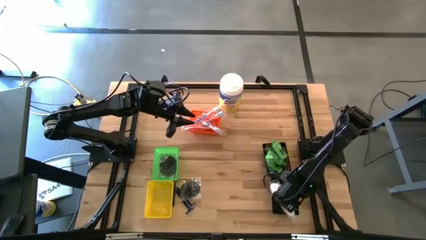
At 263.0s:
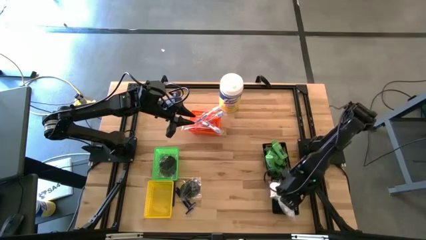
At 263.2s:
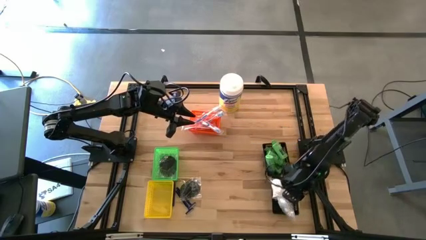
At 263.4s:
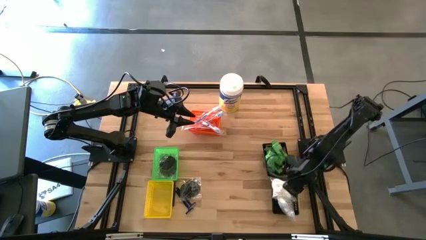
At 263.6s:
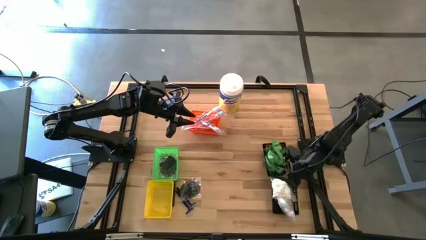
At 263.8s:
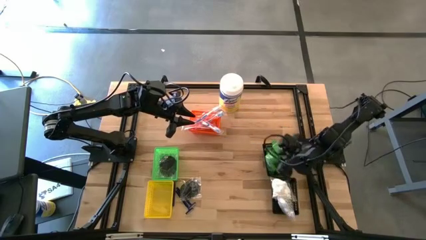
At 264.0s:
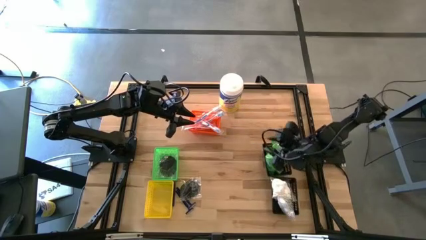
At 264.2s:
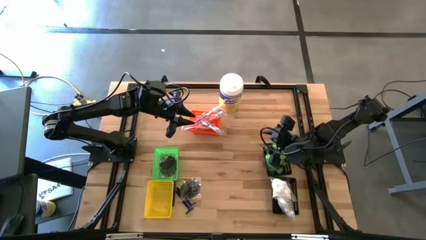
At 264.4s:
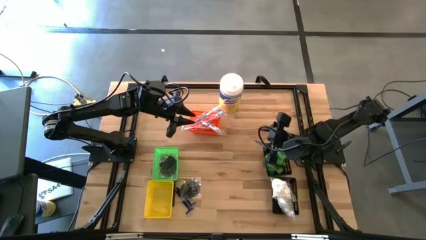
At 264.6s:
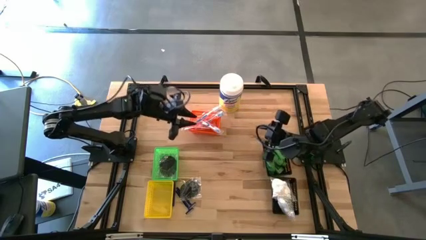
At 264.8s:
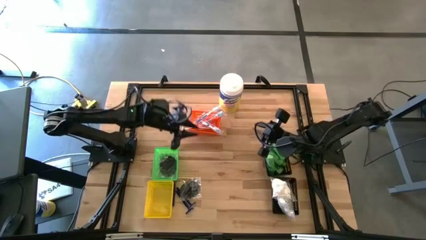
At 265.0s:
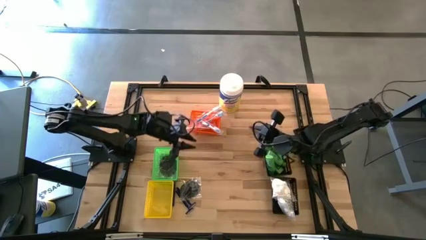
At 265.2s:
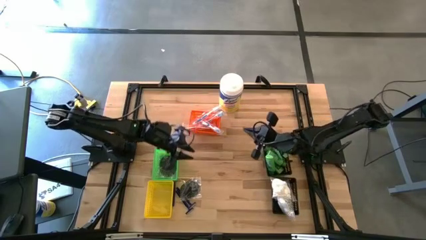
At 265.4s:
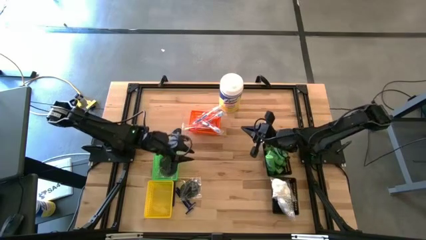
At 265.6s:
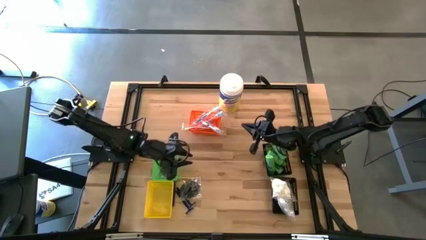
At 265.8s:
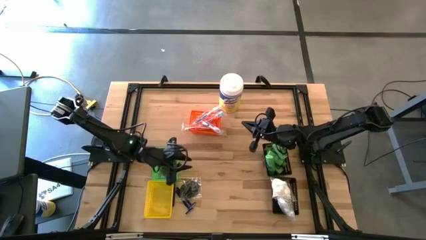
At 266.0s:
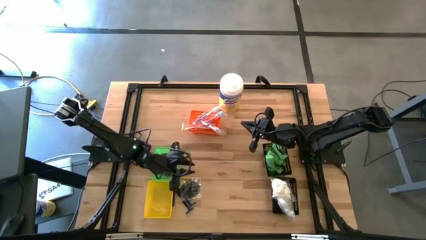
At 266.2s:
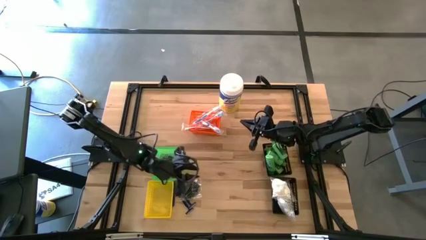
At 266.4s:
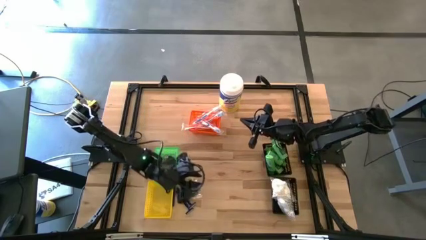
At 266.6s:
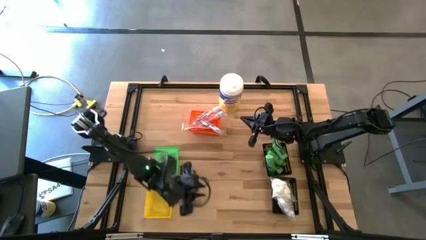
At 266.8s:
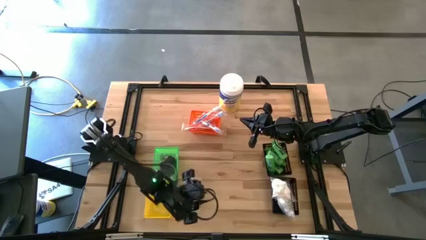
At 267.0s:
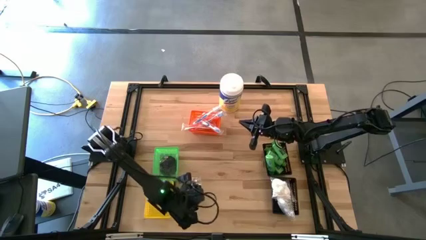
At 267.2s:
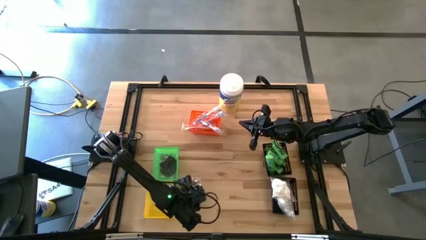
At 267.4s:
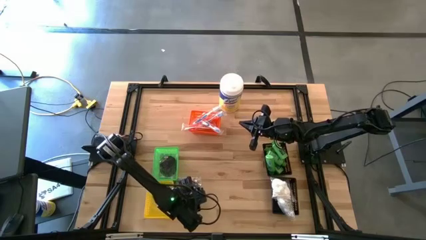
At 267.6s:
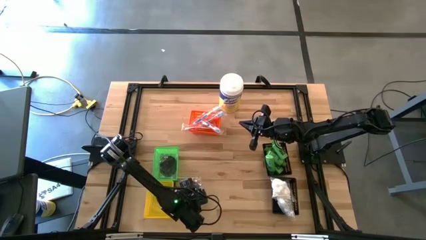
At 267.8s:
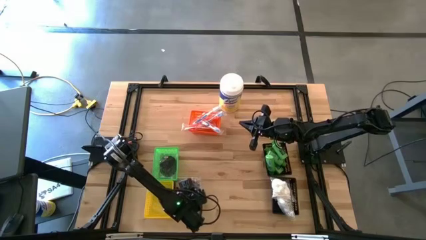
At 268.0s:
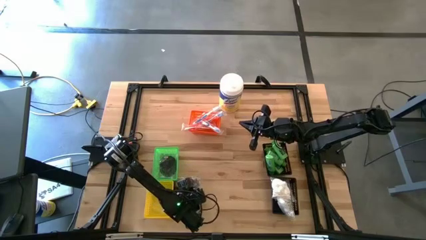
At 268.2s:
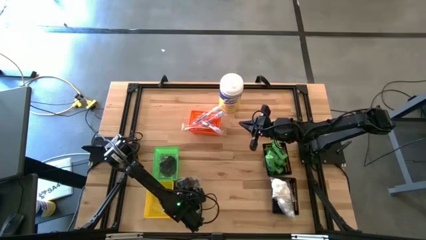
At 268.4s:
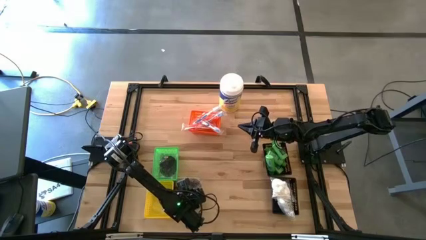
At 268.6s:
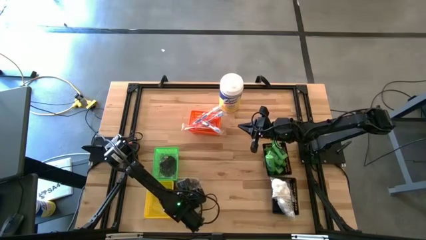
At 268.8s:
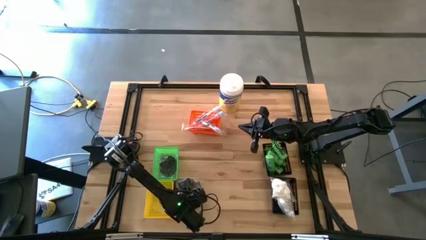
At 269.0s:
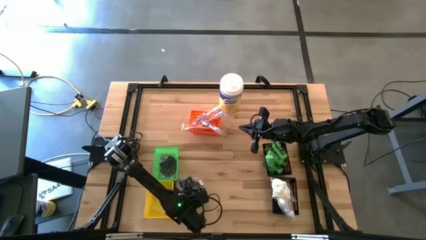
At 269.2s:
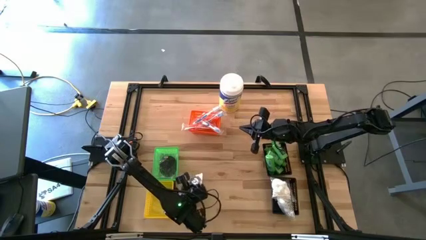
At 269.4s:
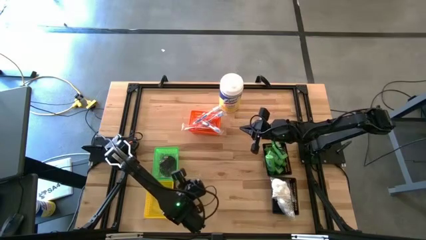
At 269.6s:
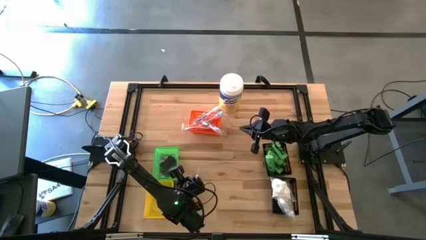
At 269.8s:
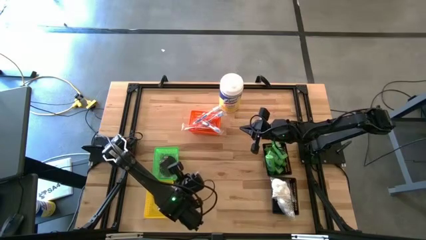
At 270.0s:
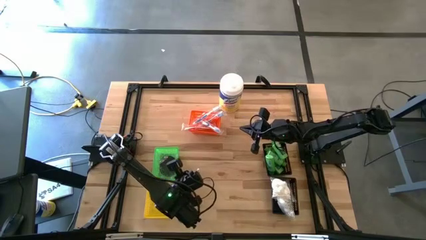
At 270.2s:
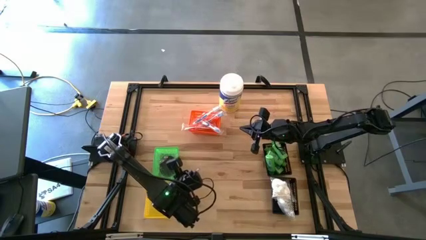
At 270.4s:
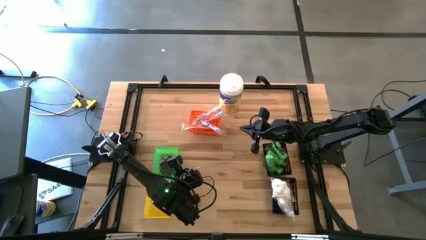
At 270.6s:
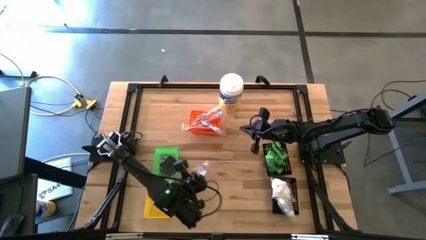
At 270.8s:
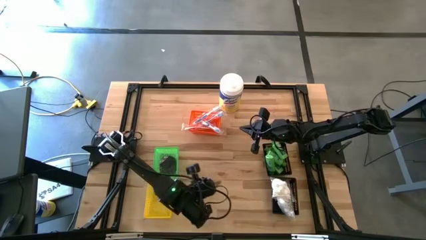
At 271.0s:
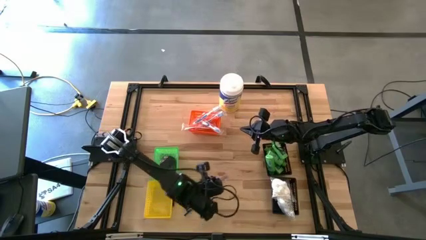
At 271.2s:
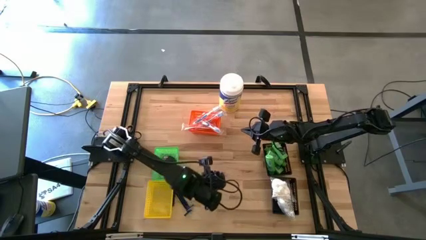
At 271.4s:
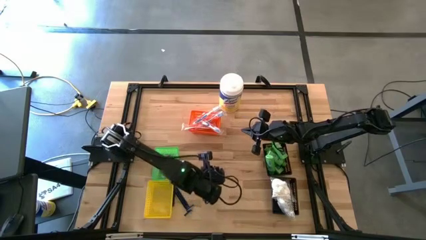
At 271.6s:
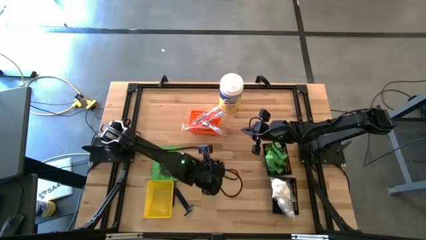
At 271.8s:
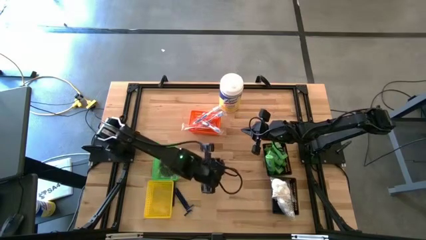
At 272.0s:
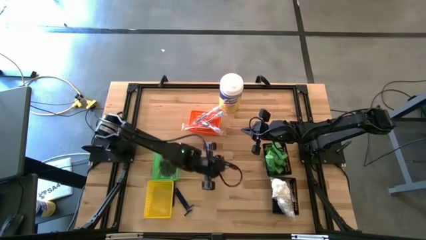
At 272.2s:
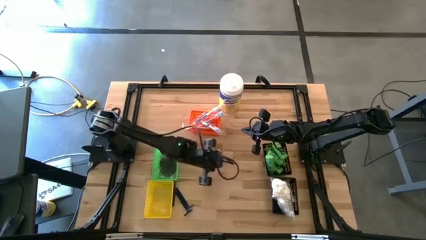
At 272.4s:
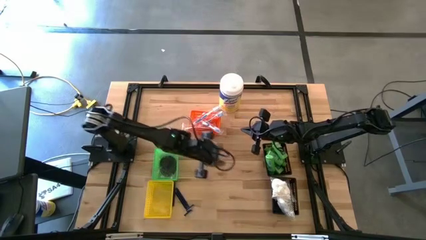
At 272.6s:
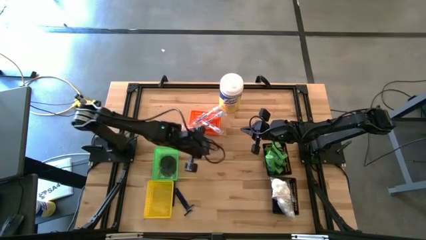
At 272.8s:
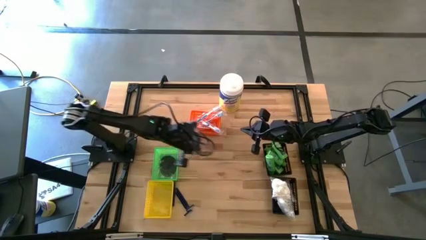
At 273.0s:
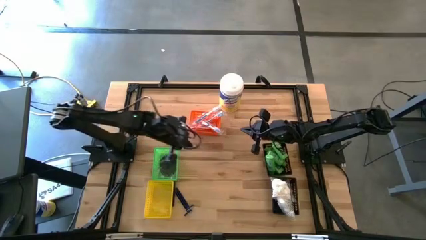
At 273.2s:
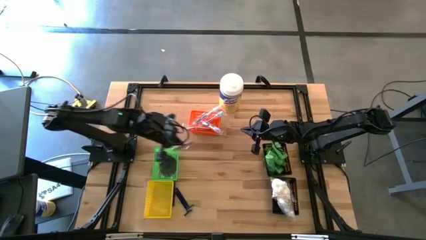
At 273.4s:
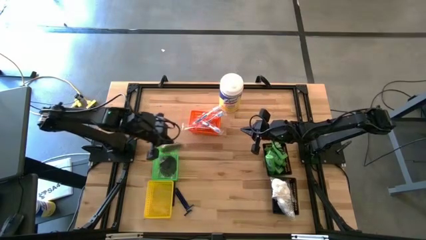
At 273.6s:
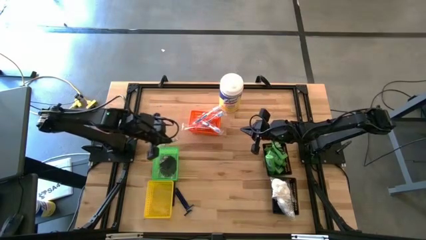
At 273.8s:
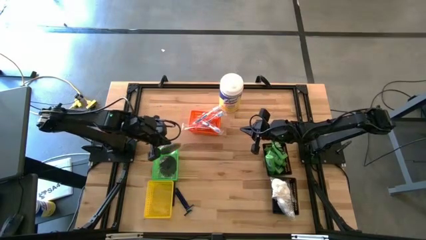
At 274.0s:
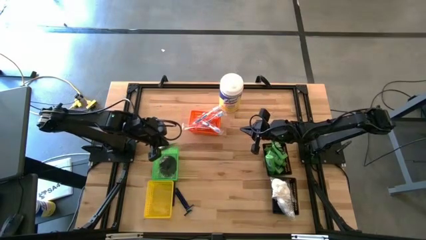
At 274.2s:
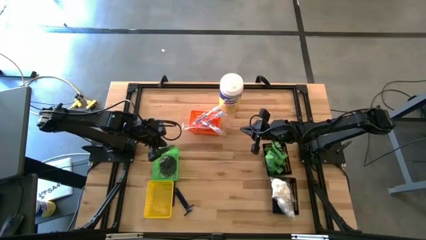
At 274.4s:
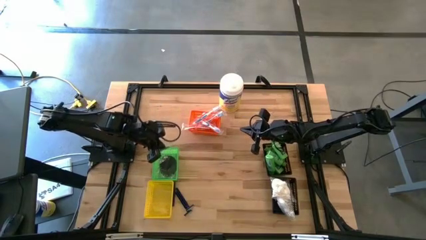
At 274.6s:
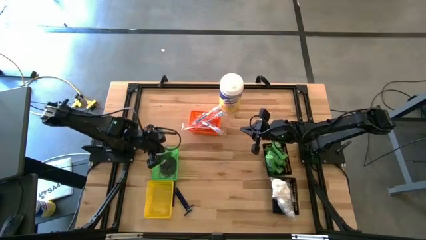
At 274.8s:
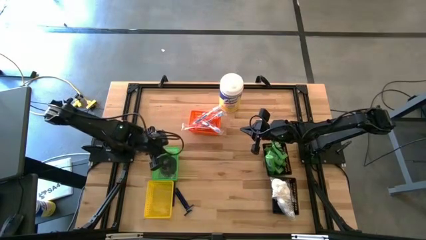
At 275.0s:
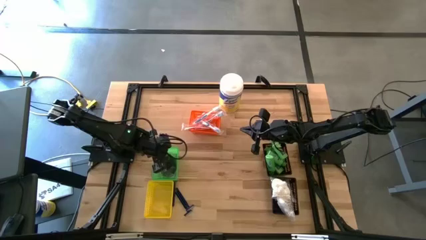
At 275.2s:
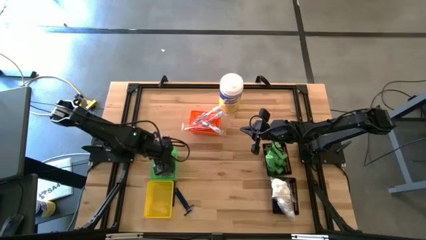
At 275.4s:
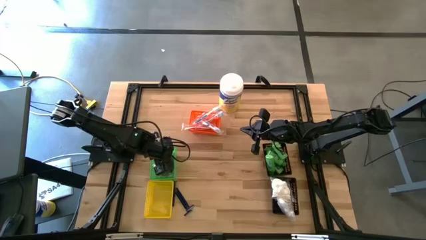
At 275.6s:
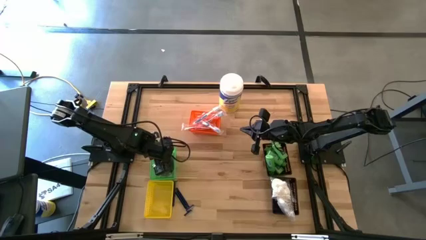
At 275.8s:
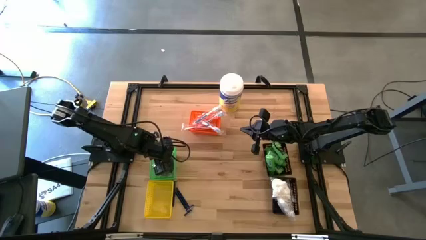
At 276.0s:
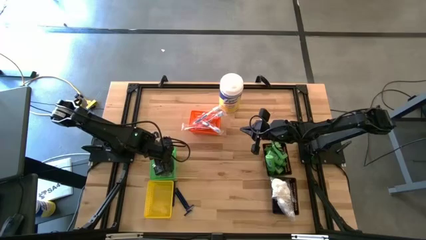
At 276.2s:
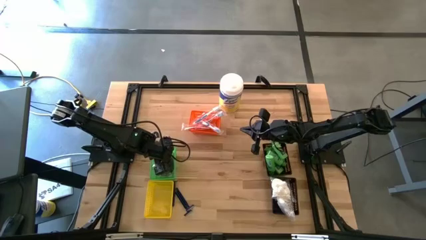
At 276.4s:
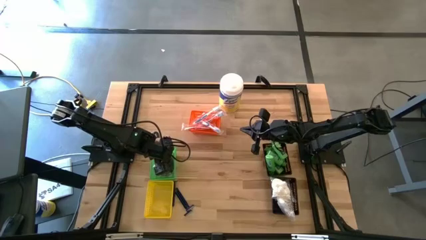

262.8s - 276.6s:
Task: Pick & Place Travel size toiletries
Put the black hairbrush into the green bin

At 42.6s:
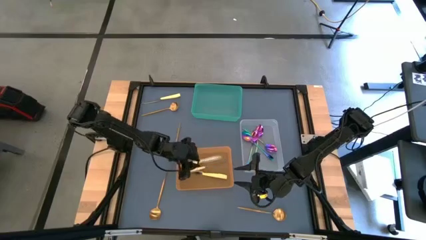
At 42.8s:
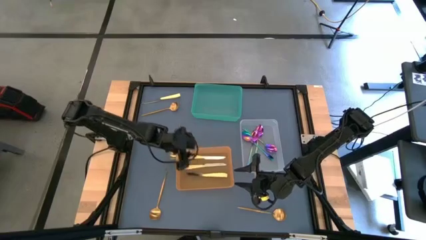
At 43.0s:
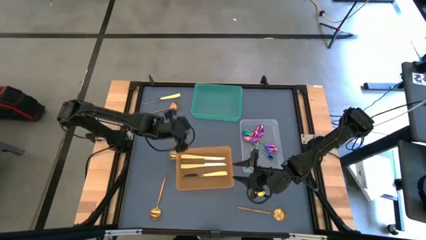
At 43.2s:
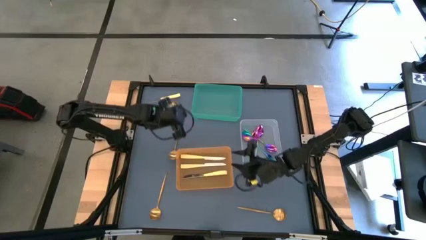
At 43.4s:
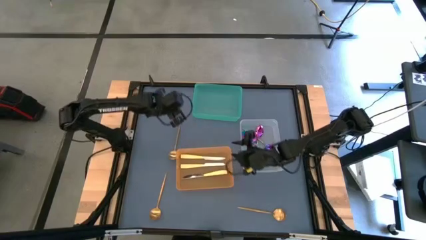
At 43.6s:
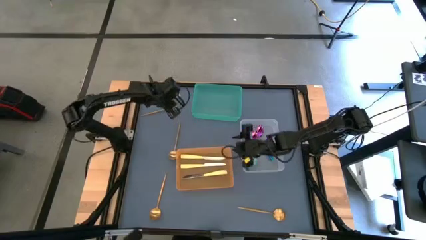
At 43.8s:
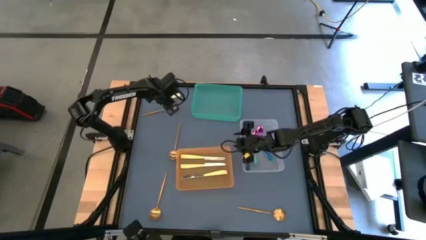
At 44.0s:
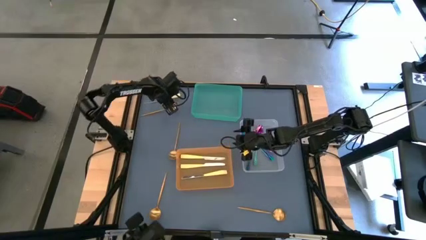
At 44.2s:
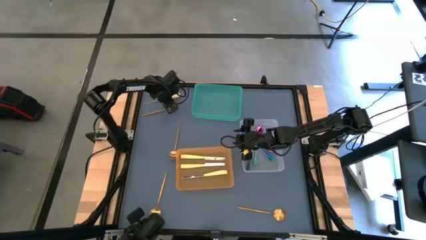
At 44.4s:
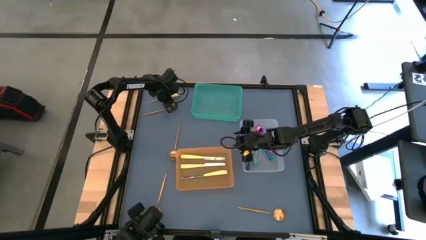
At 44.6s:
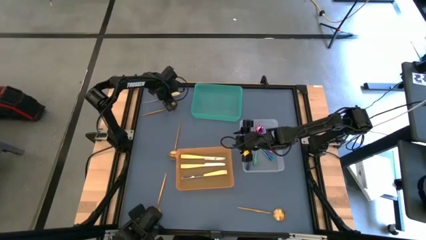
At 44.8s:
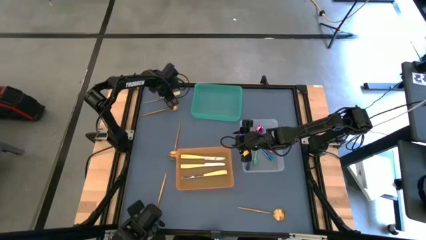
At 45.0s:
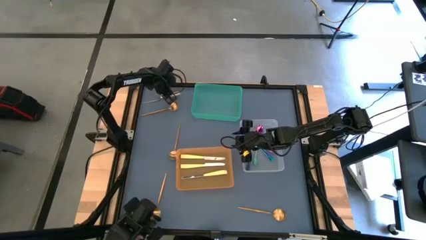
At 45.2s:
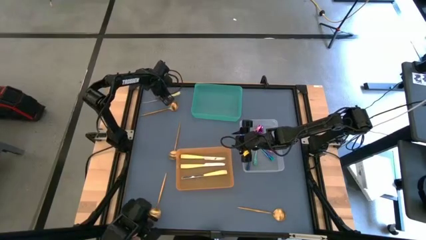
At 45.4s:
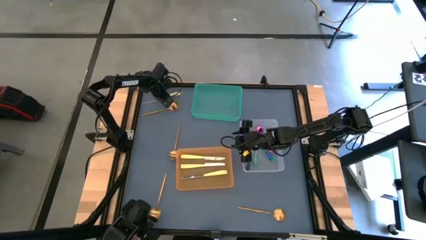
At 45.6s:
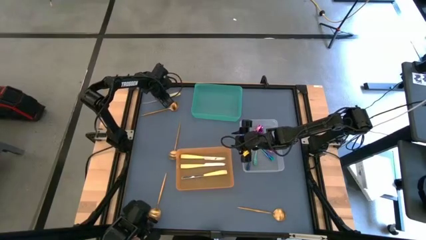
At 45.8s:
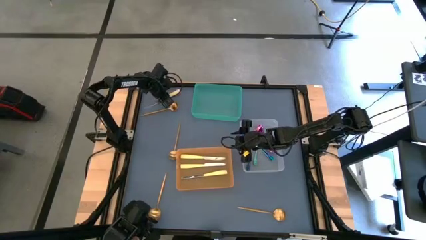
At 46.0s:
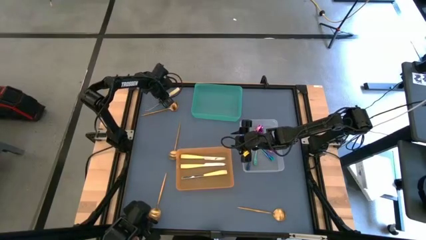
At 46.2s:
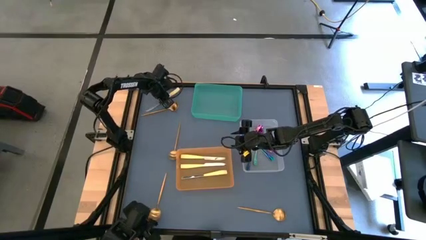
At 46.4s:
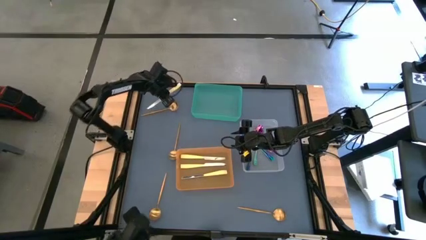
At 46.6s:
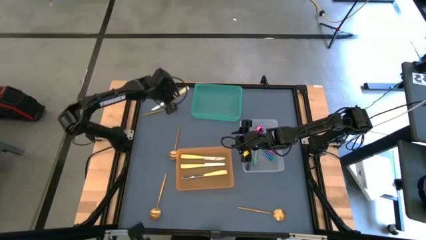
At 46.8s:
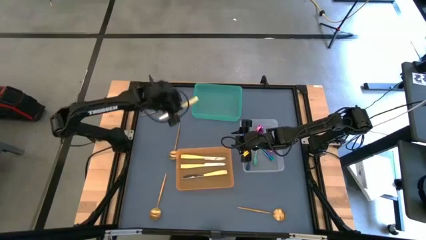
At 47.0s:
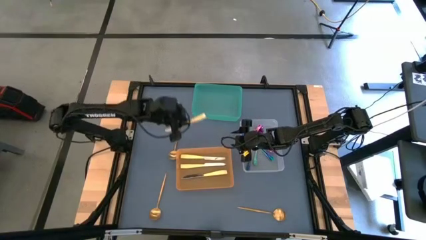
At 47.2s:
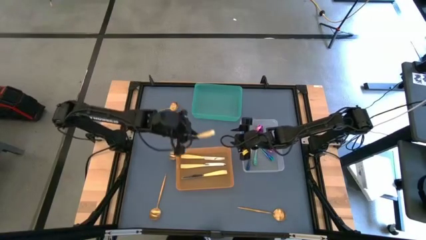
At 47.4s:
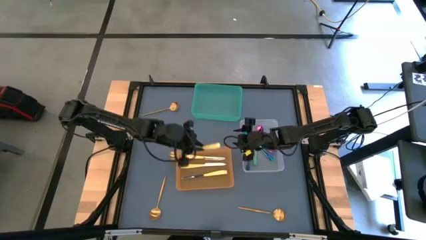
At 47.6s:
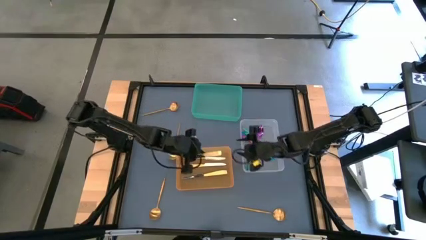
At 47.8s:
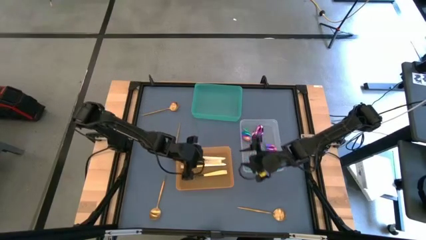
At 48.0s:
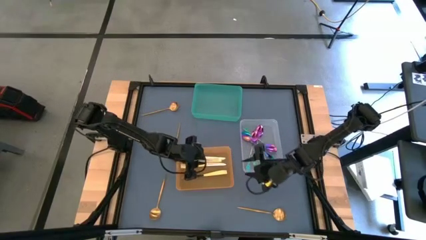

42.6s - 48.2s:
Task: Sort silverware by color (type)
Put the yellow table knife into the orange bin
